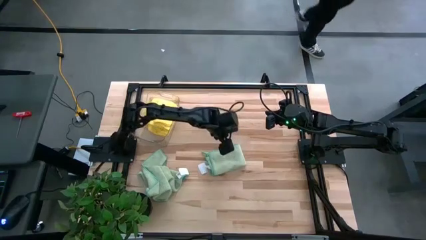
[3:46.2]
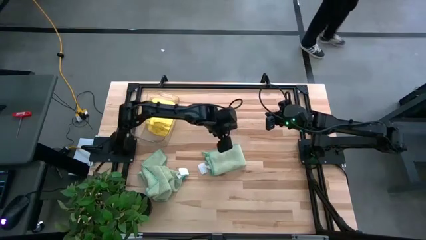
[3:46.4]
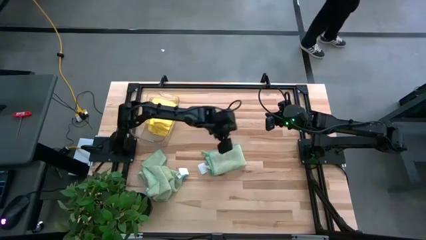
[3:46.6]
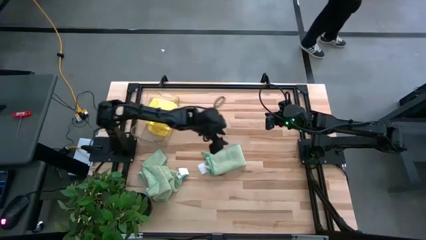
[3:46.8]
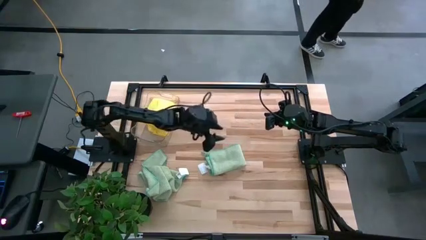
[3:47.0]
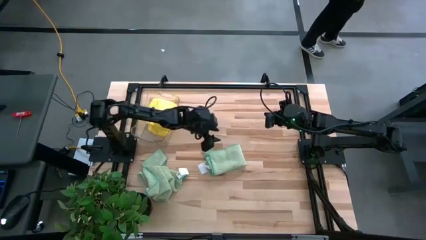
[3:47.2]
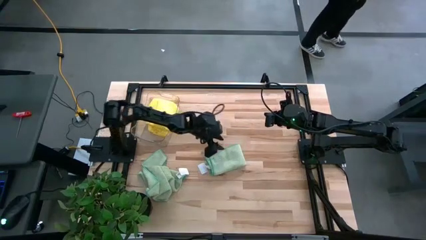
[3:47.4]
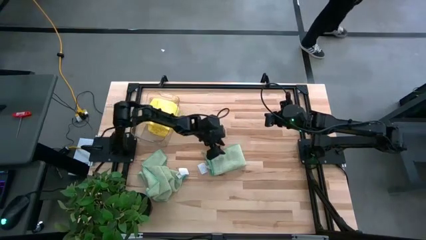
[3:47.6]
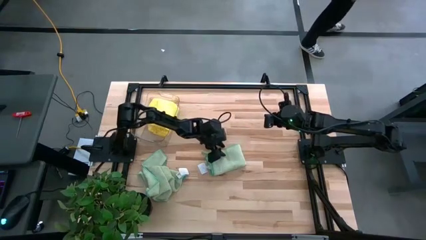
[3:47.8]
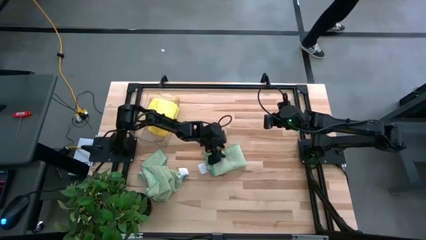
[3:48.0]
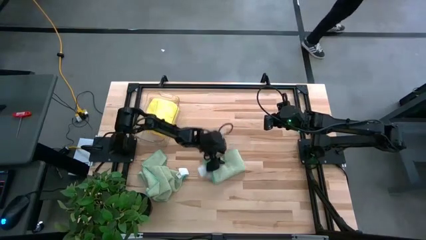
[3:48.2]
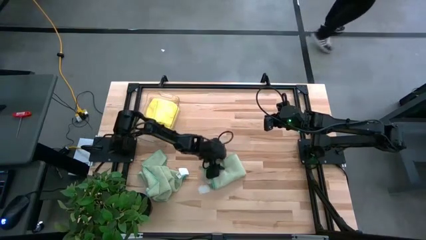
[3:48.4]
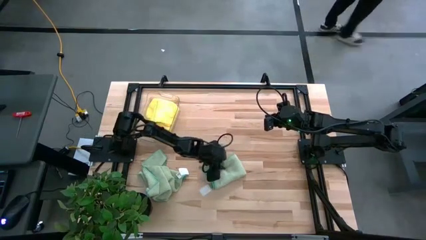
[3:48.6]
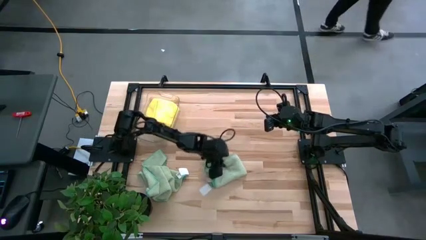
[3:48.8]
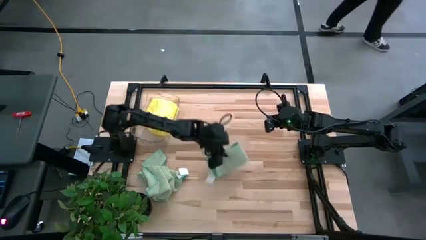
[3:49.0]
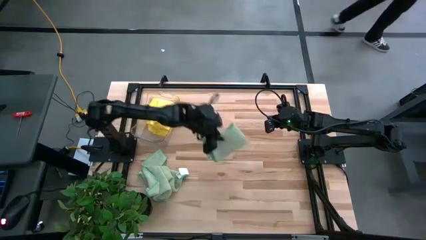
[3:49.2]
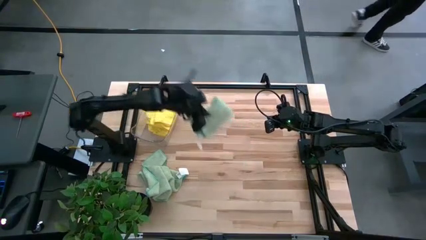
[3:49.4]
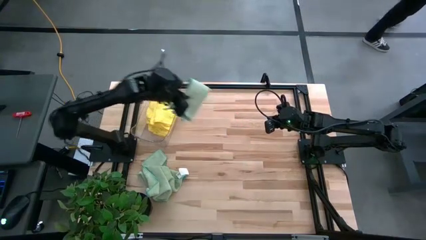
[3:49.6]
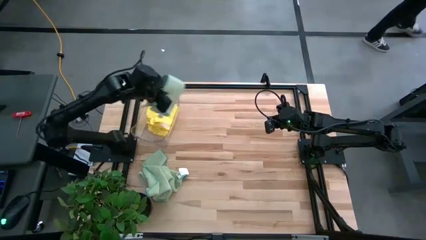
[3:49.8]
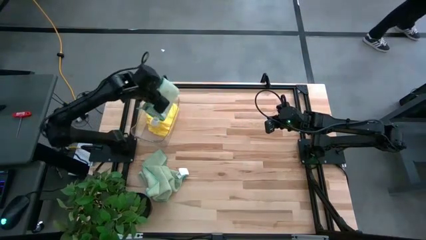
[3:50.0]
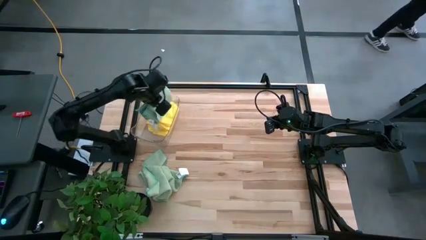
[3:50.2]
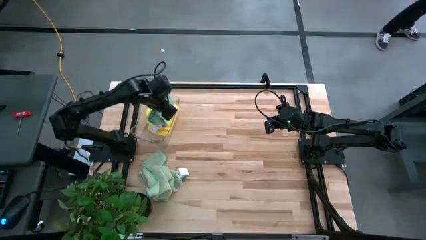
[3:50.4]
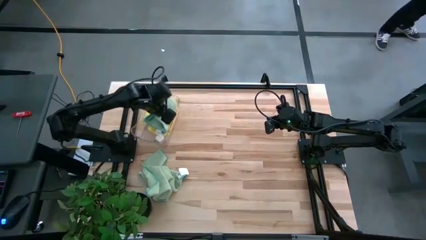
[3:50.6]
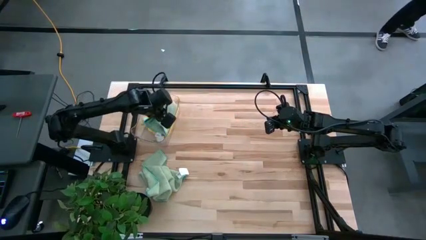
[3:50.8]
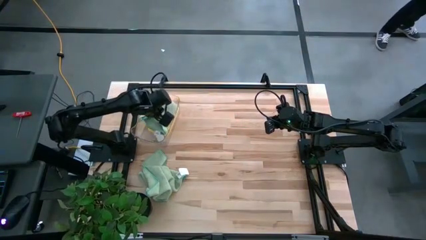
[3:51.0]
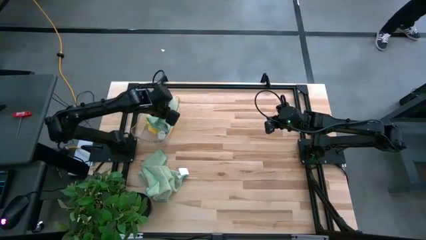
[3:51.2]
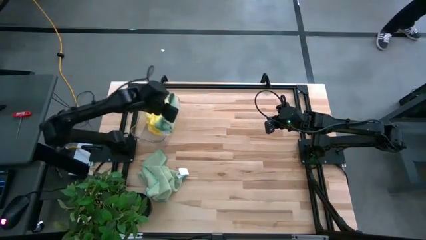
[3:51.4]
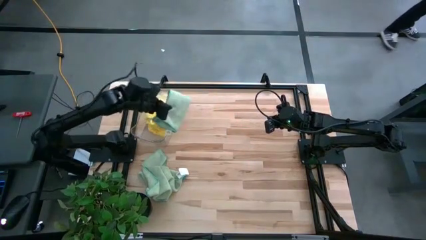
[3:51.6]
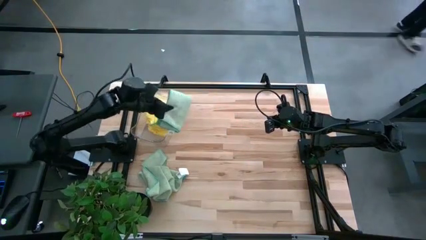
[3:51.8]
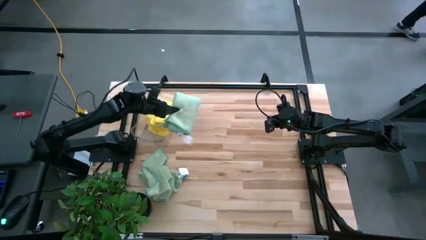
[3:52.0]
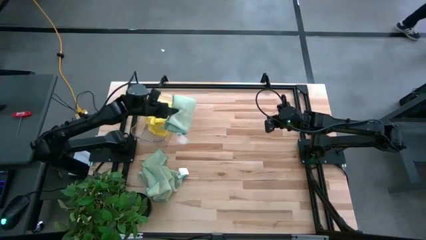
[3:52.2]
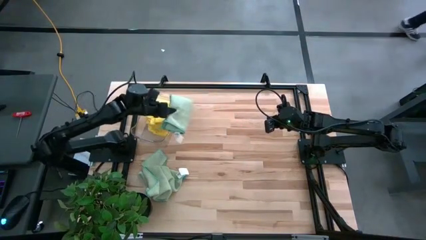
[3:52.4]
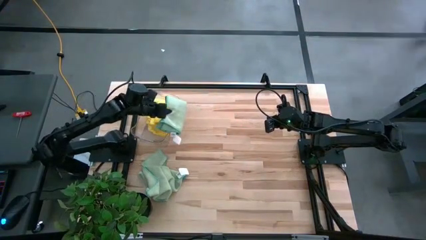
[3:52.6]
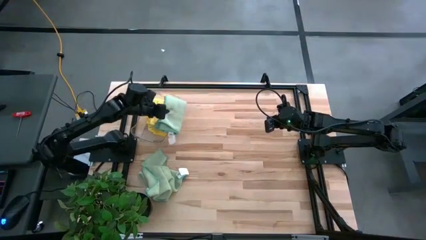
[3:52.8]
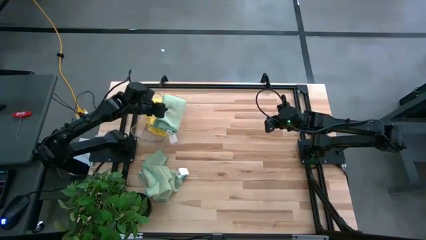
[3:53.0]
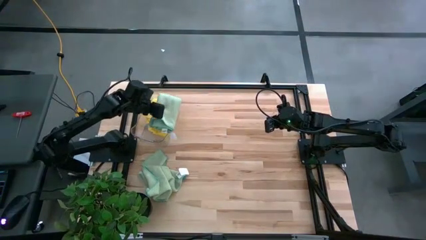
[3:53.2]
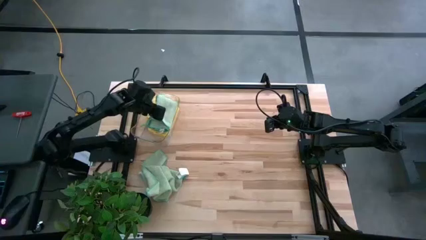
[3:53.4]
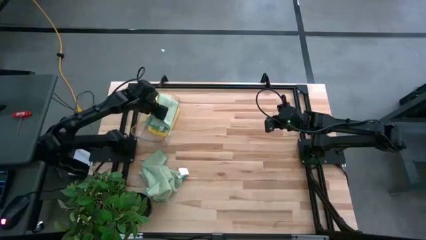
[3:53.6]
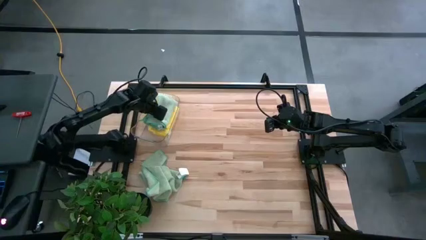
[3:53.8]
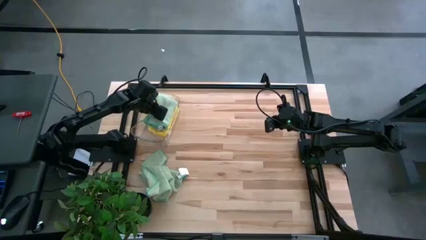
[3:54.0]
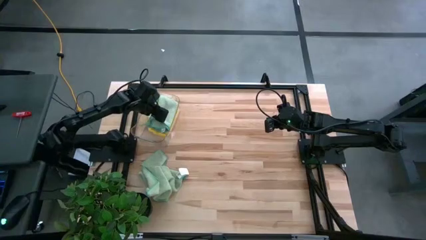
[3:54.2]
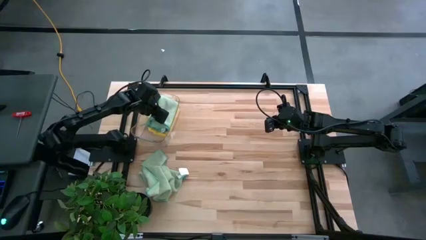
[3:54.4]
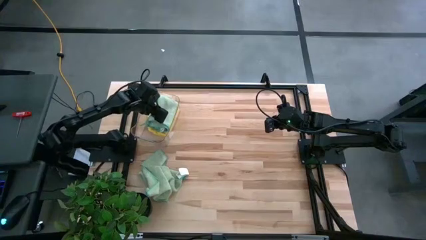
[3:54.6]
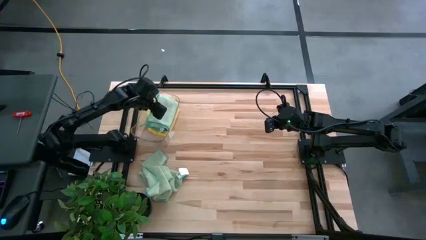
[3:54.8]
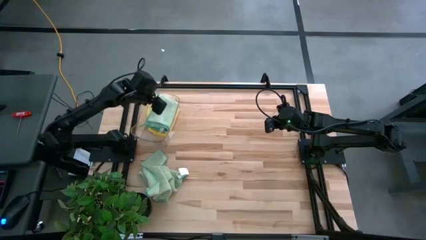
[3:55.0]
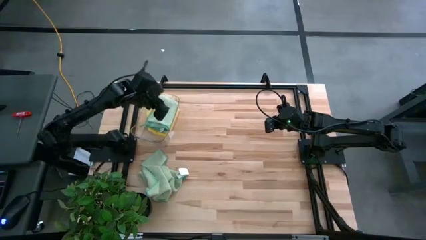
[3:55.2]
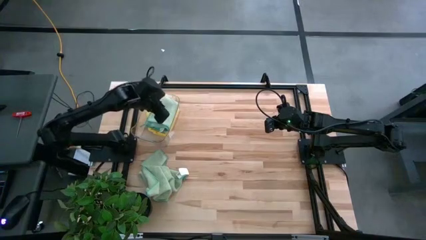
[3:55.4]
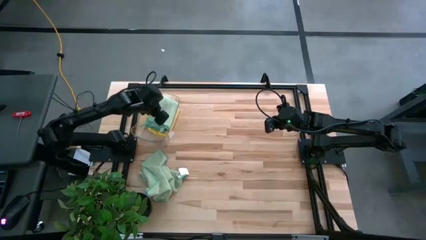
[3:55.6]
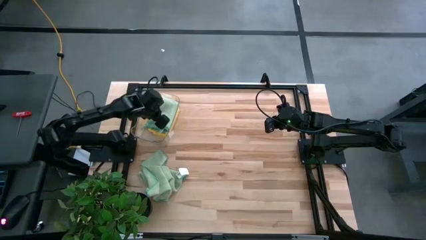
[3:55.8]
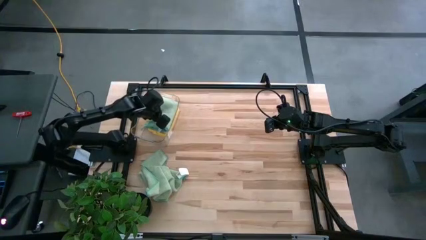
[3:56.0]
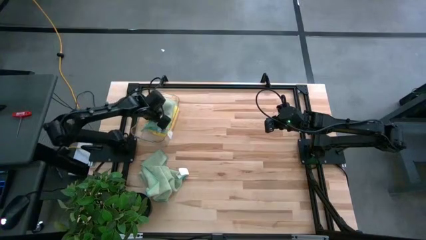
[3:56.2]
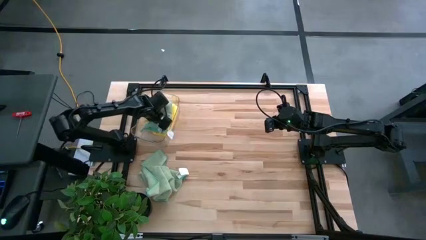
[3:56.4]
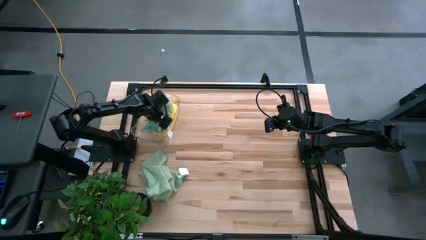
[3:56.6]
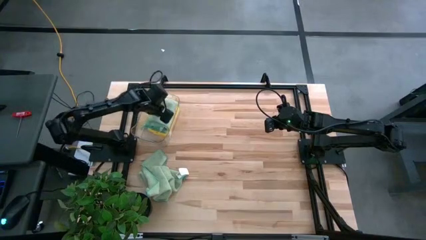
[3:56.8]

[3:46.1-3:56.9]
Task: Fold microfiber towels
Put the right folded green towel into the transparent bin

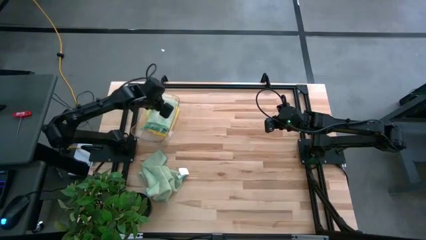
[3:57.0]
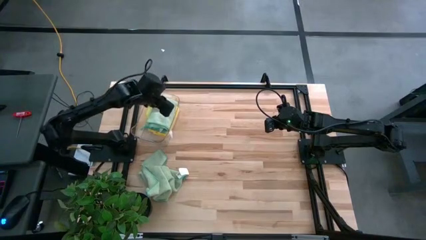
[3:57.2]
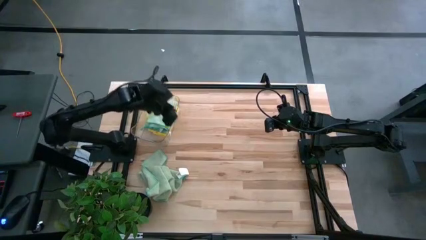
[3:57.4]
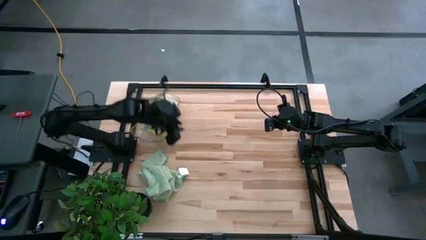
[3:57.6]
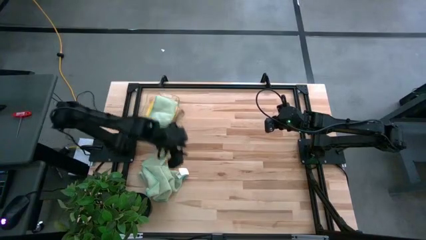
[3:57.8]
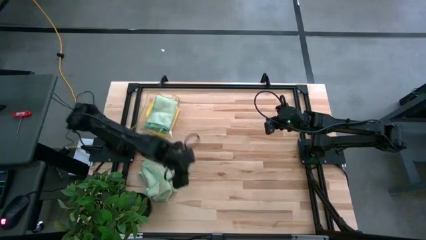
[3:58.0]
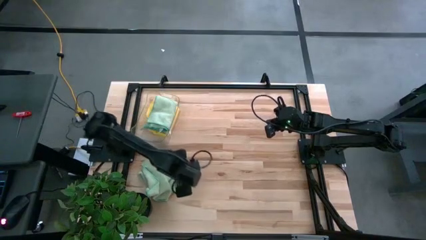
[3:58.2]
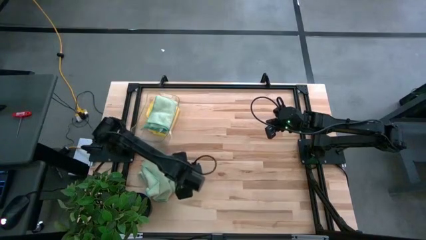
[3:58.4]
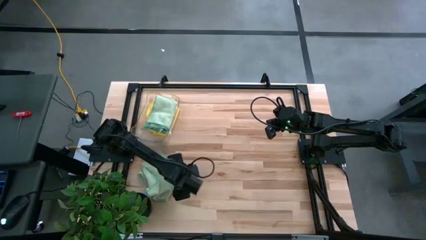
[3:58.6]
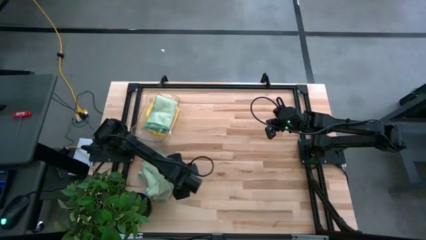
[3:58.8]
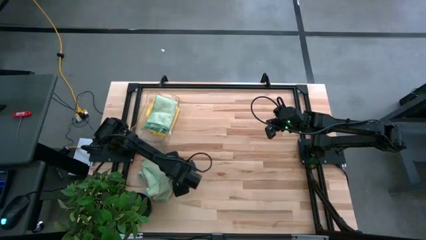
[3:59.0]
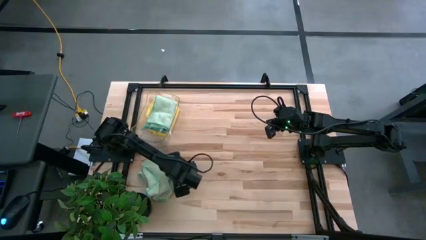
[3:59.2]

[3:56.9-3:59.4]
Fold the green towel
